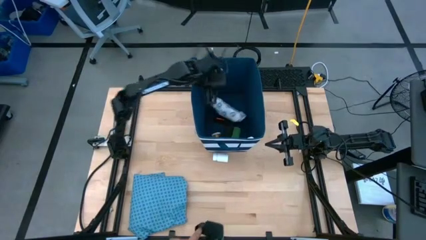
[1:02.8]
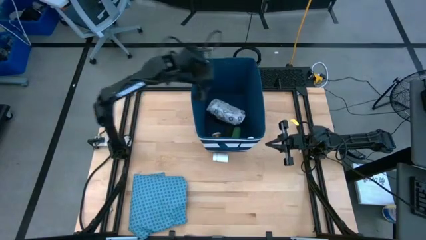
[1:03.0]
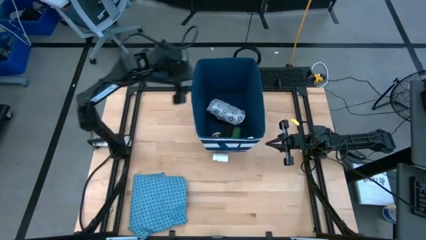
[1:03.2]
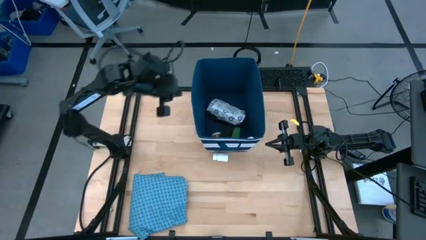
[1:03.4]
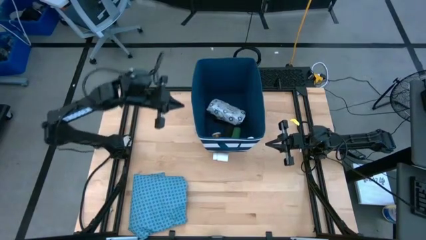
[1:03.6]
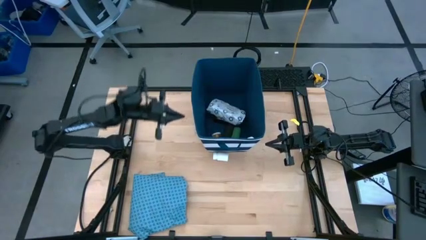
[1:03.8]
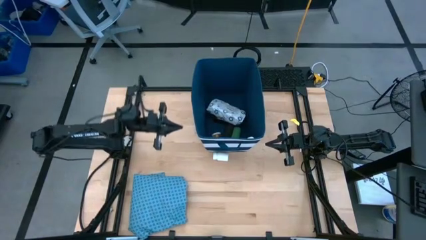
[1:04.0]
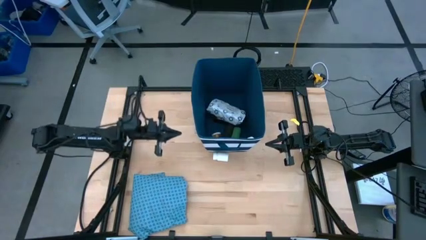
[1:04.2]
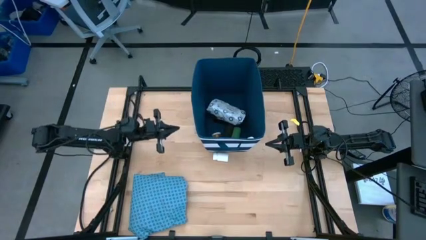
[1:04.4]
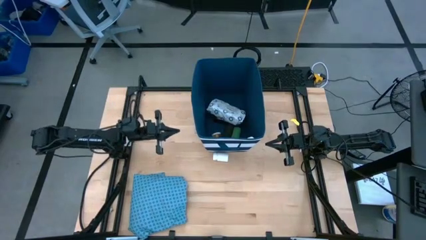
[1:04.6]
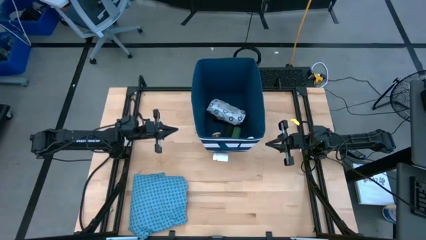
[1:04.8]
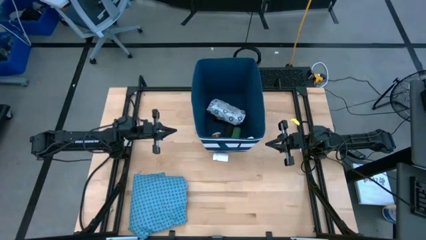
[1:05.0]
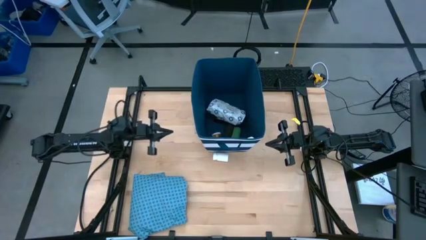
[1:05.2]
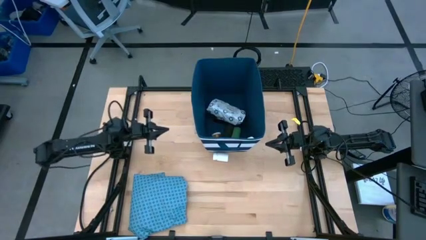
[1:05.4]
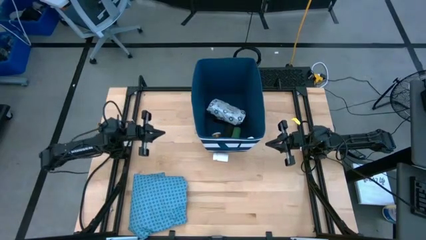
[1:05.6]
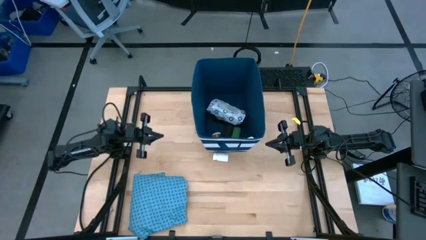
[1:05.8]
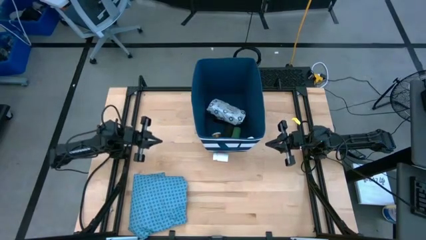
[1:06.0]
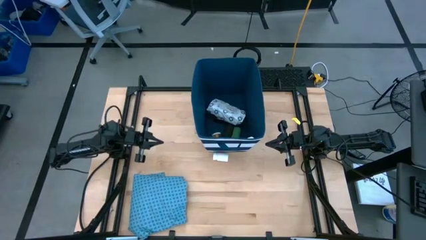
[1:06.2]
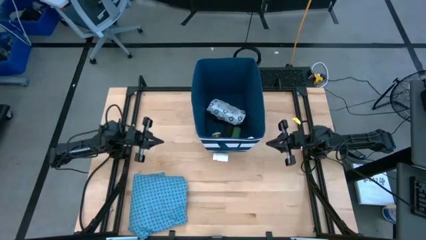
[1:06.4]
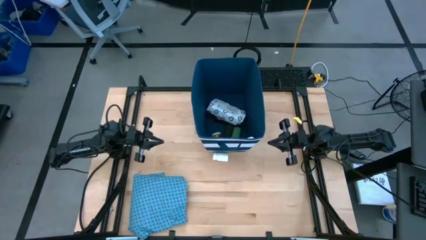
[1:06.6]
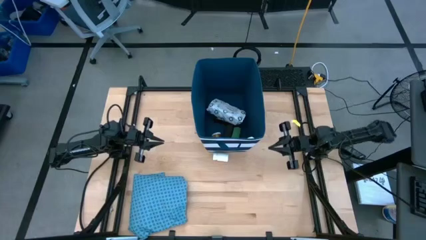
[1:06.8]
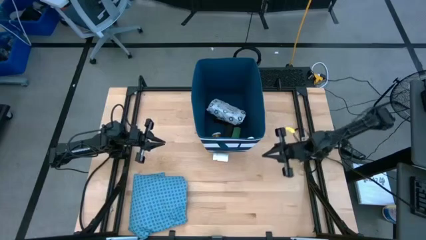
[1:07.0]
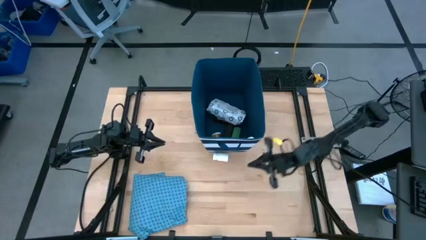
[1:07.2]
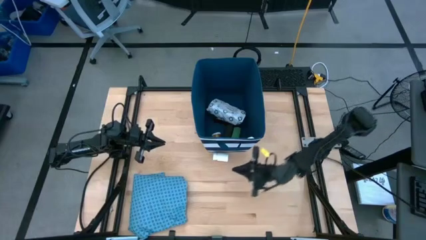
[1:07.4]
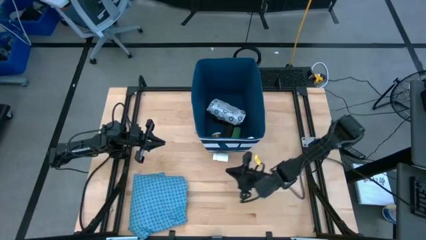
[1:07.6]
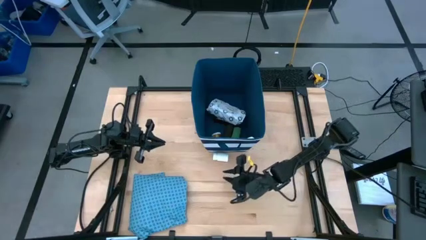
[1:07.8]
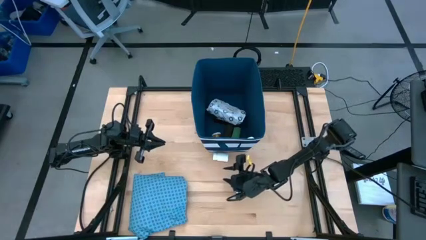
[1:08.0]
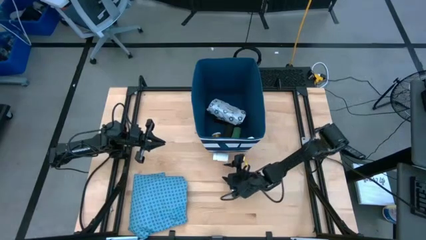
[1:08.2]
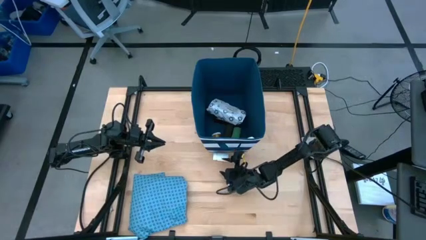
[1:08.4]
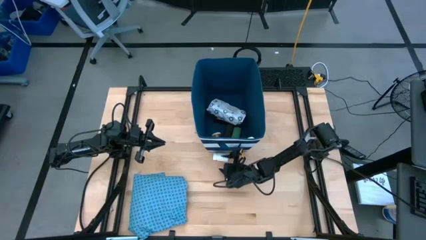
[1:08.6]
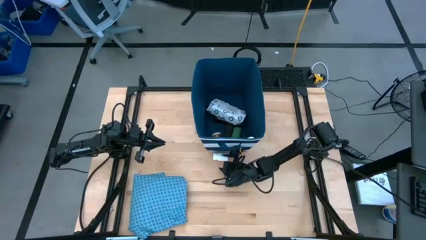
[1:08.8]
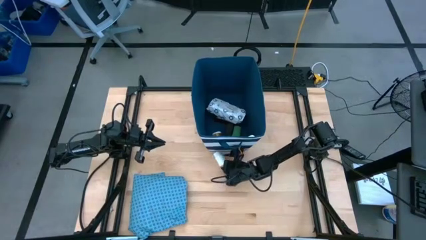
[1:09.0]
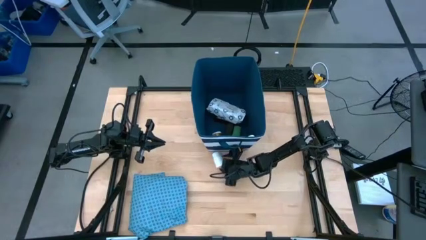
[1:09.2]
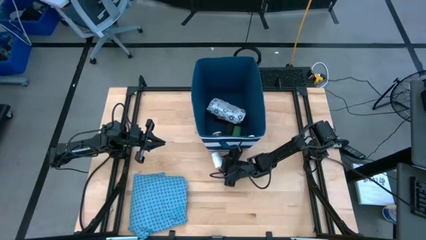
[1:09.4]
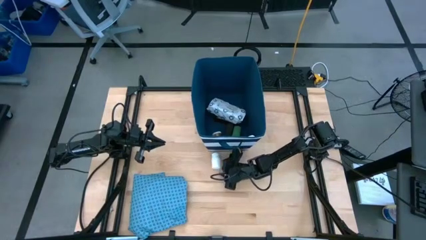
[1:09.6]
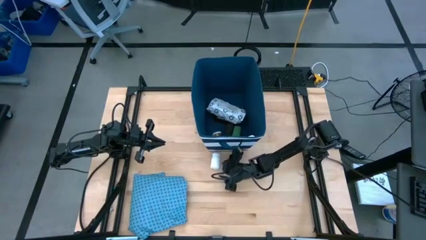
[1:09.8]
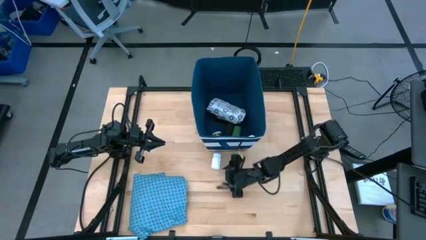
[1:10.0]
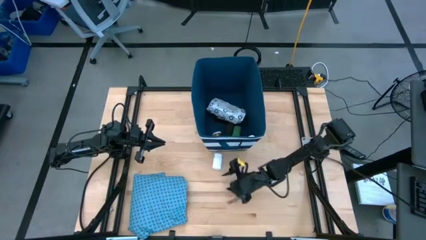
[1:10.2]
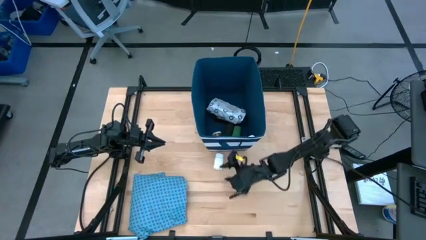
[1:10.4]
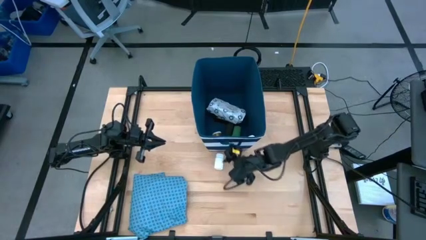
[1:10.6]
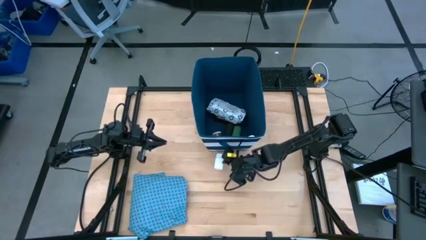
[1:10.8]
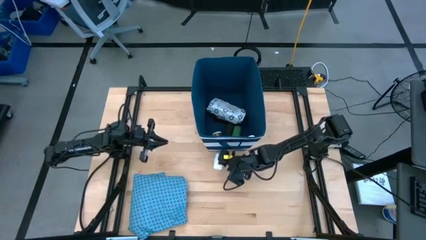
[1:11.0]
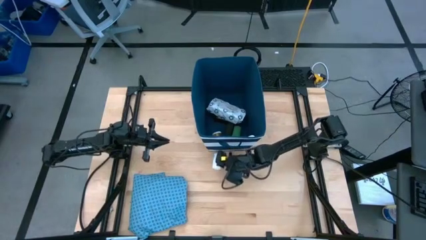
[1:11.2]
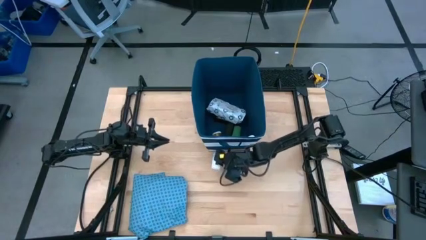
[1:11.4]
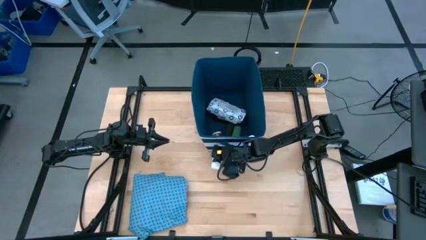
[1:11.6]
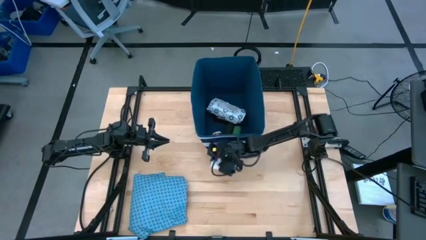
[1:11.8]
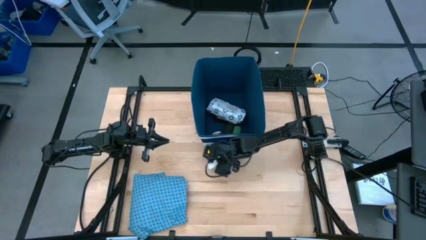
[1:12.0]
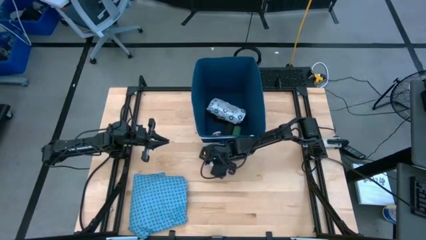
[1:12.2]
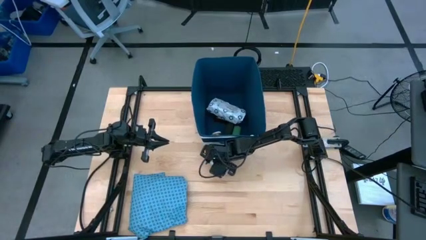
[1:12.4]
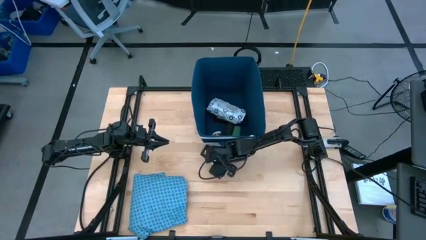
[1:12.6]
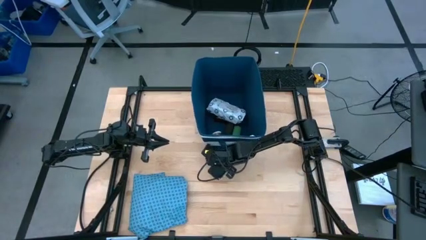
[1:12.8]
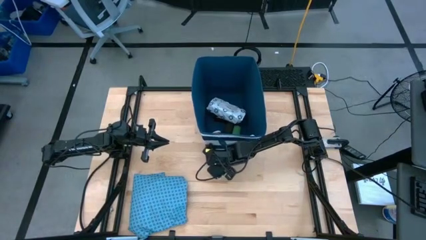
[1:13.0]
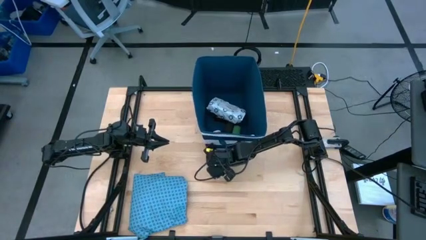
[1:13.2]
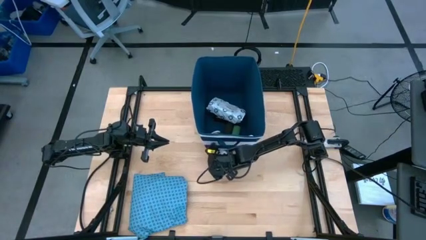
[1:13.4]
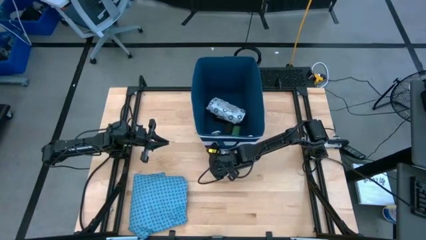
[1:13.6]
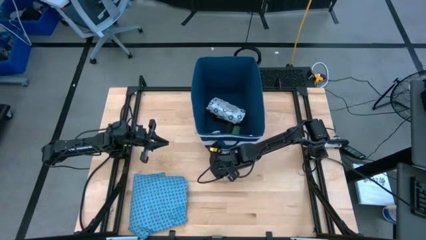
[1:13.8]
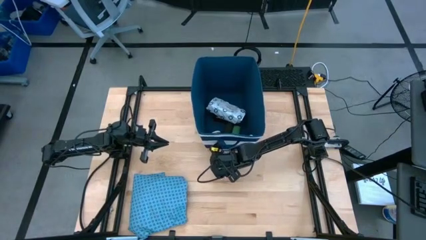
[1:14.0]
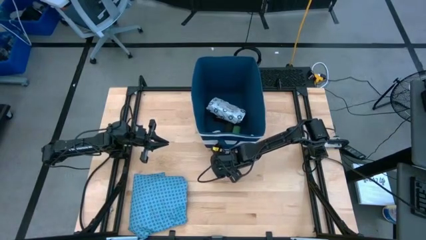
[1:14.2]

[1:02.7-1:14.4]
Task: Pick & place medical supplies in basket/bin
Put the white medicine bottle into the basket

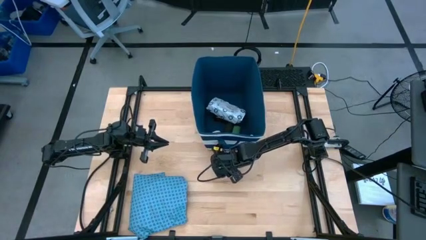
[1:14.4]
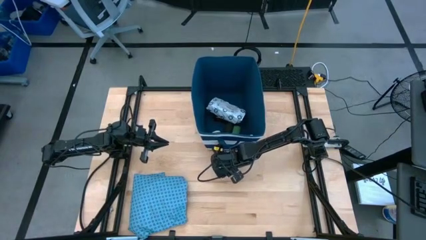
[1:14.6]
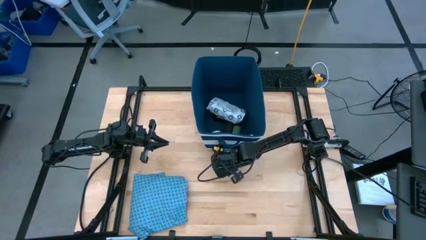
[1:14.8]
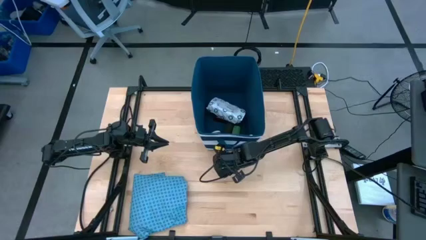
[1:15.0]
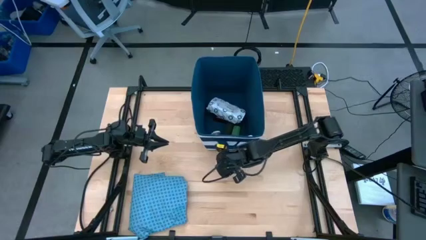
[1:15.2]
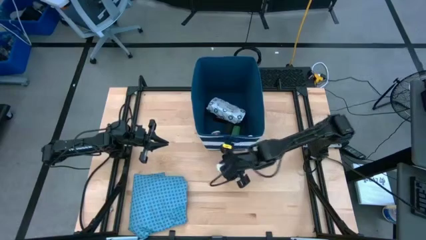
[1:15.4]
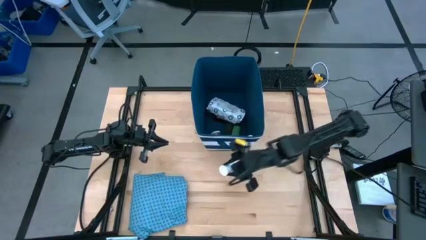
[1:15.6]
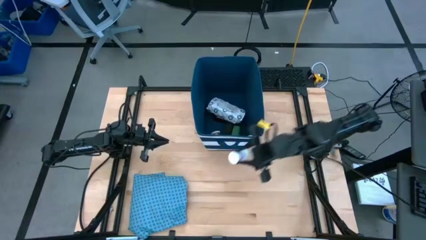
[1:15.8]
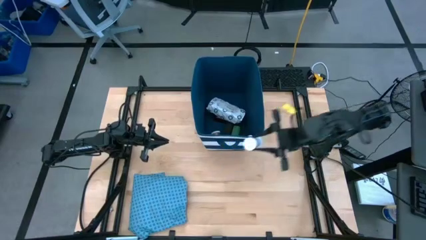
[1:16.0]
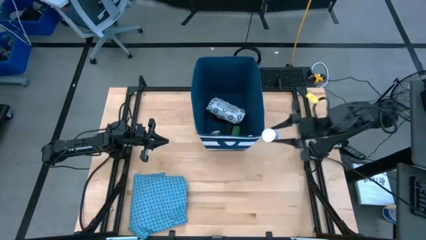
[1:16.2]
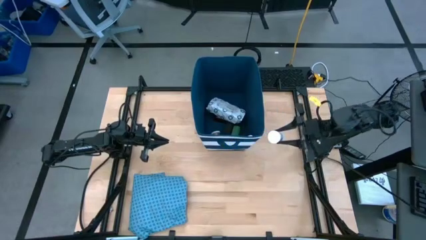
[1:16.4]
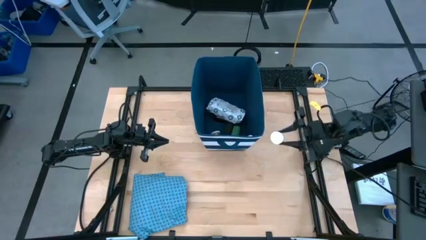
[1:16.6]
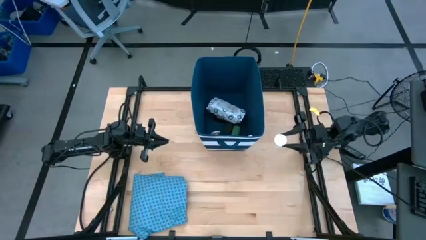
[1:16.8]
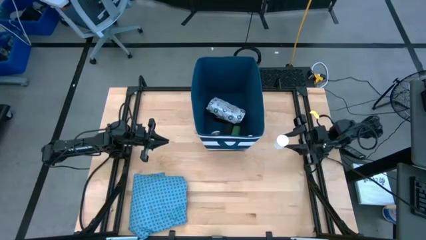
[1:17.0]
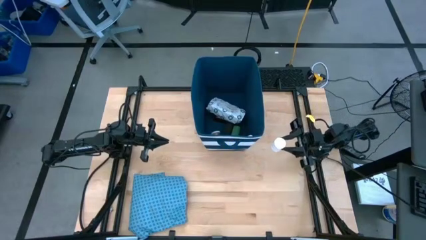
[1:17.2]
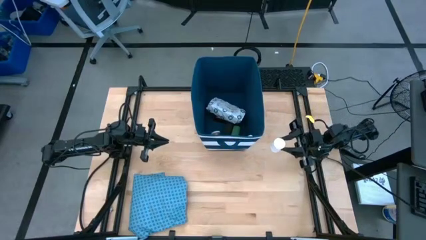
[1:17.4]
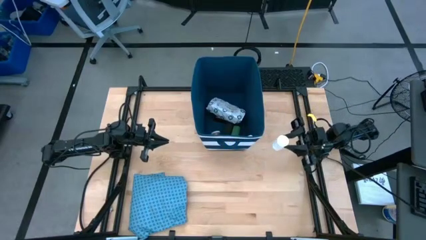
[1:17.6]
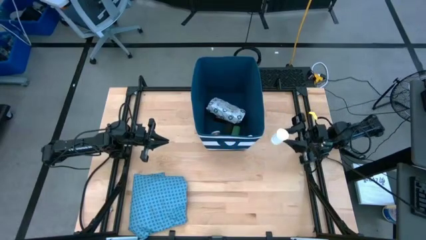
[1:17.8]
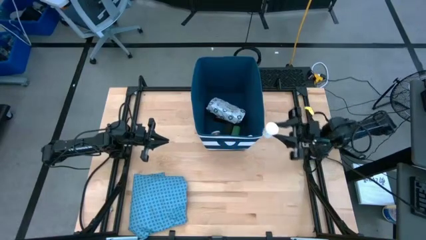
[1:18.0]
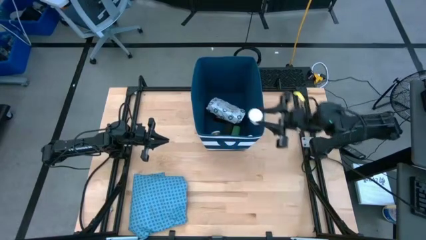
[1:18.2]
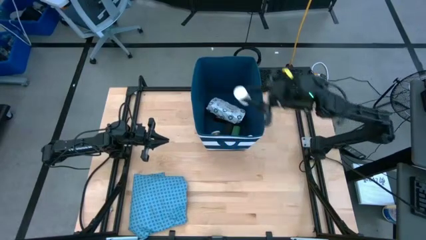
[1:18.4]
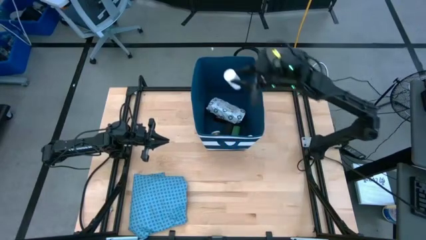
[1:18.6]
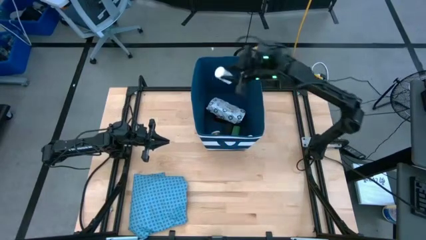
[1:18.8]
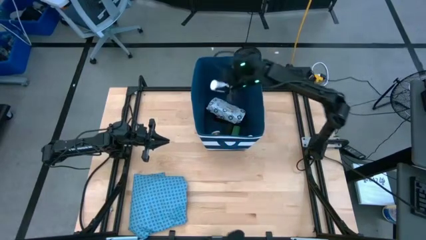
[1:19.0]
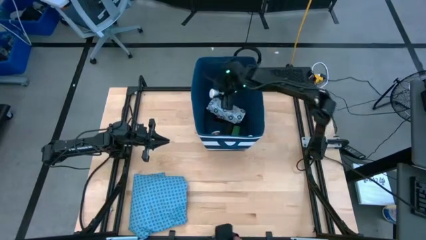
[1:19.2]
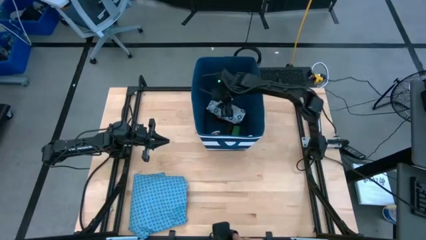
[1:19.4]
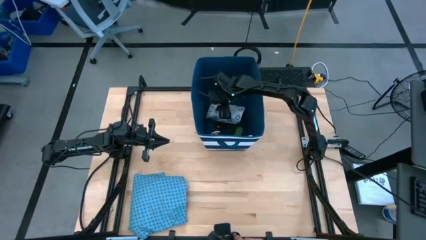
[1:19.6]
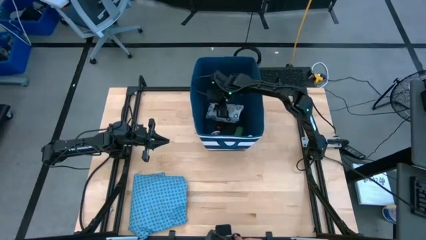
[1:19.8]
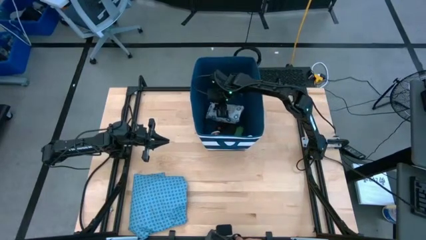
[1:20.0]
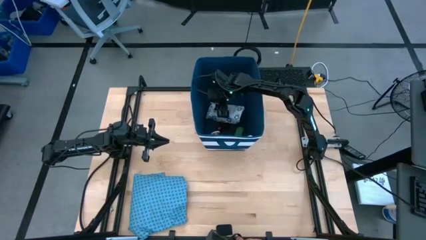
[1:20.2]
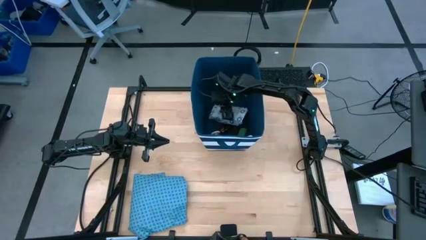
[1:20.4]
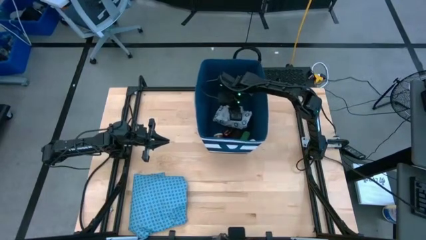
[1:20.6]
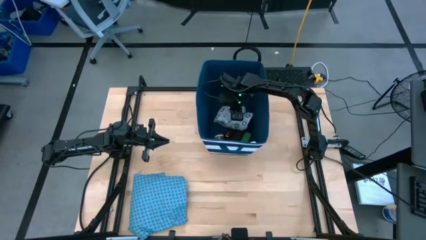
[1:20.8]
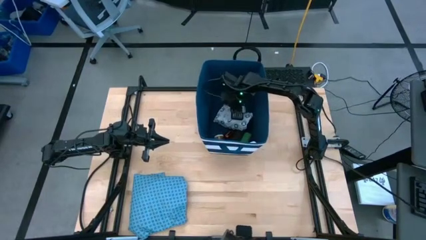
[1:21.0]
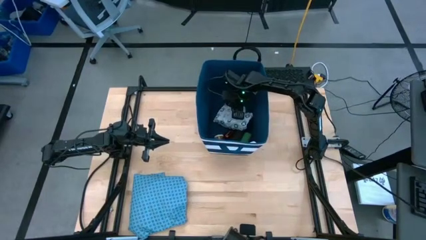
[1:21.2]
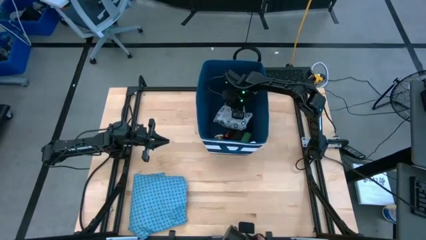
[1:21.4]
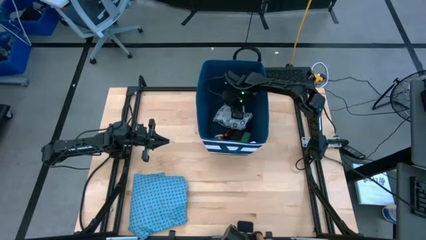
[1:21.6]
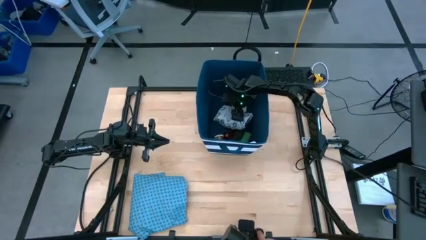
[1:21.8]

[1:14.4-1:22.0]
Put the white medicine bottle into the basket
